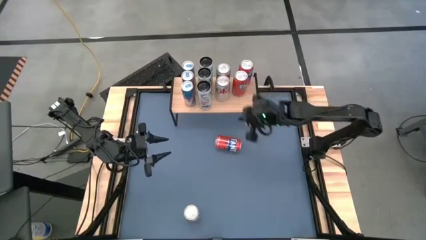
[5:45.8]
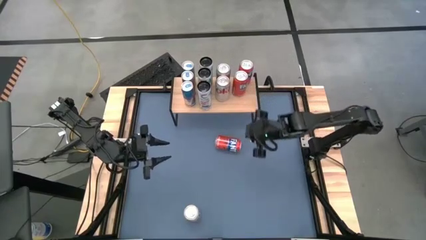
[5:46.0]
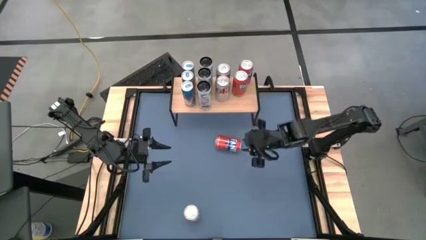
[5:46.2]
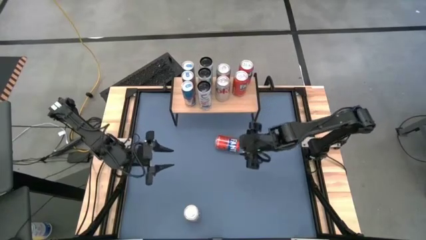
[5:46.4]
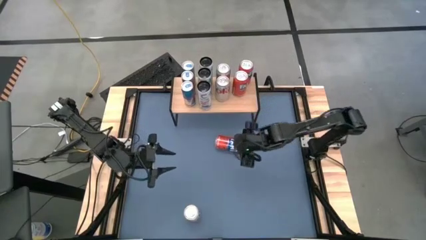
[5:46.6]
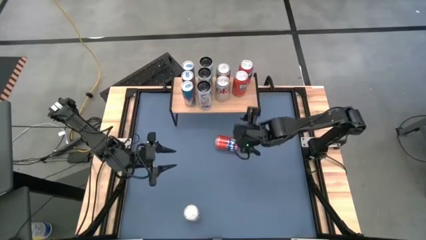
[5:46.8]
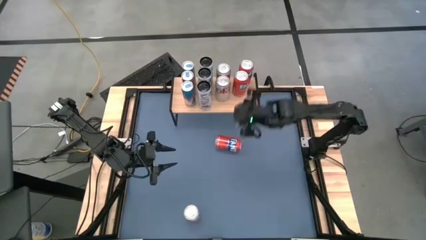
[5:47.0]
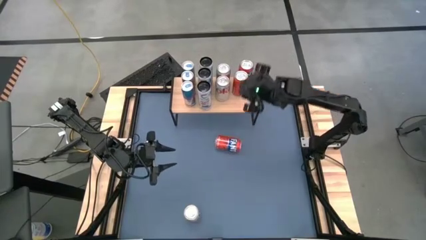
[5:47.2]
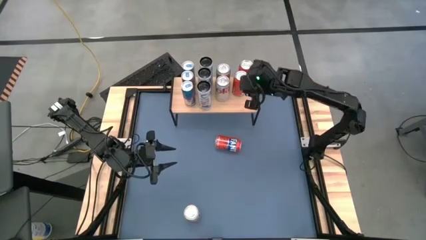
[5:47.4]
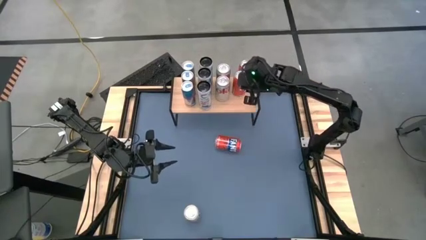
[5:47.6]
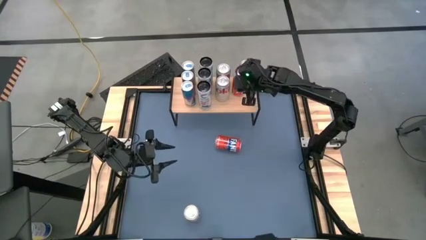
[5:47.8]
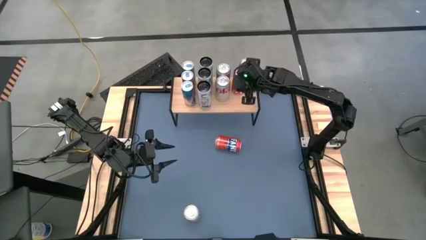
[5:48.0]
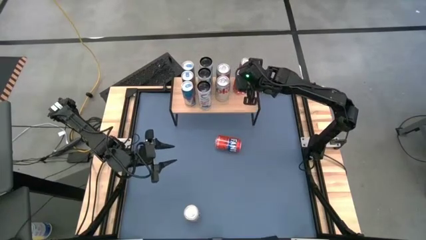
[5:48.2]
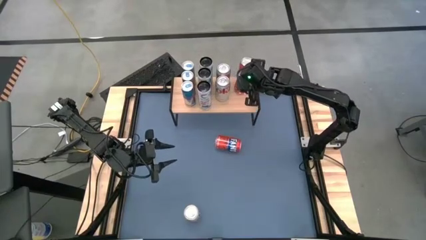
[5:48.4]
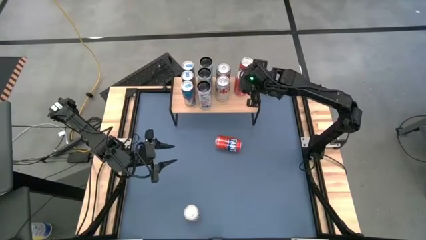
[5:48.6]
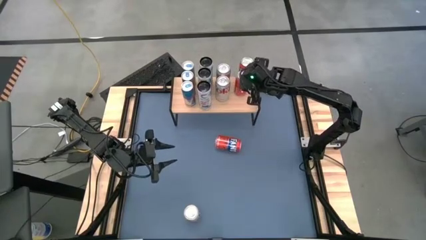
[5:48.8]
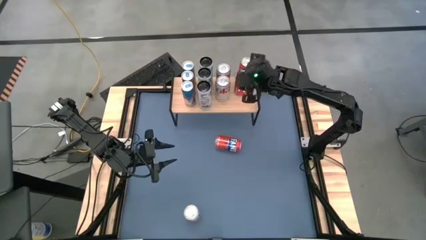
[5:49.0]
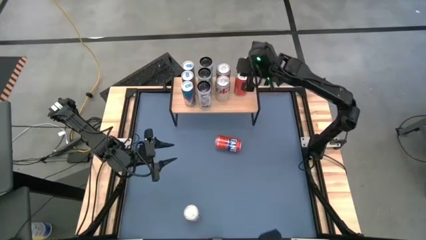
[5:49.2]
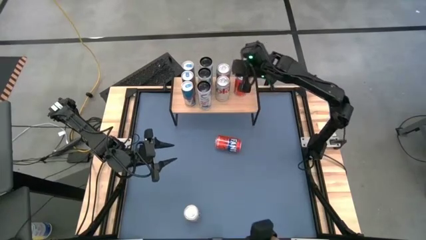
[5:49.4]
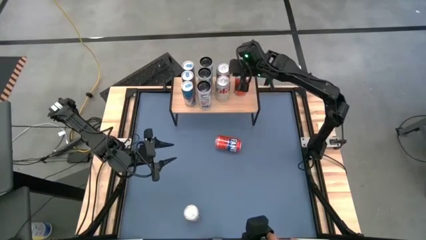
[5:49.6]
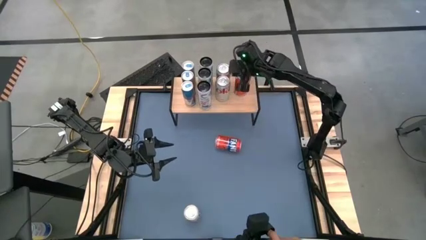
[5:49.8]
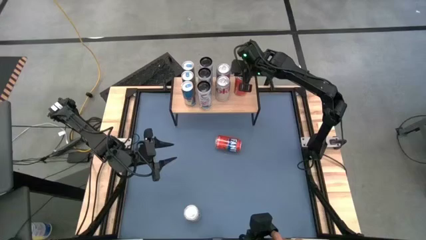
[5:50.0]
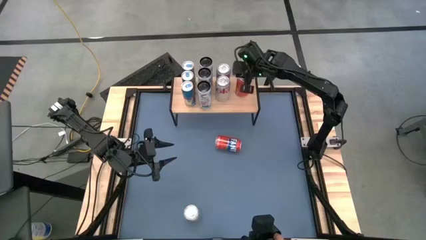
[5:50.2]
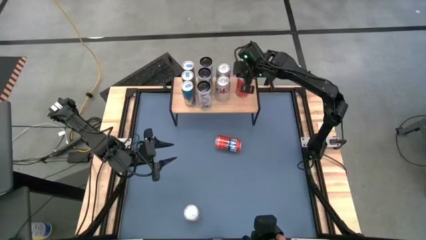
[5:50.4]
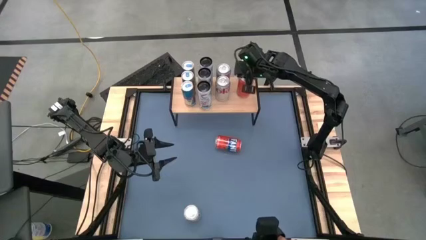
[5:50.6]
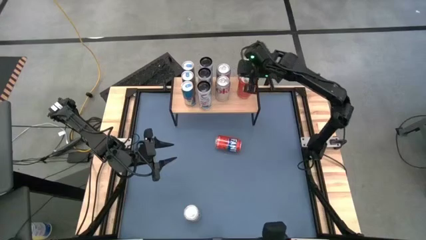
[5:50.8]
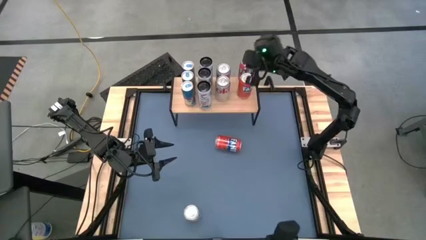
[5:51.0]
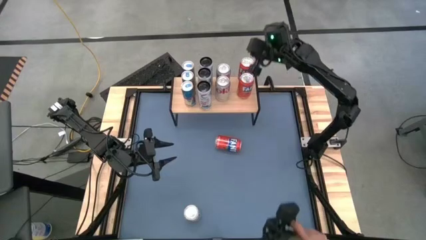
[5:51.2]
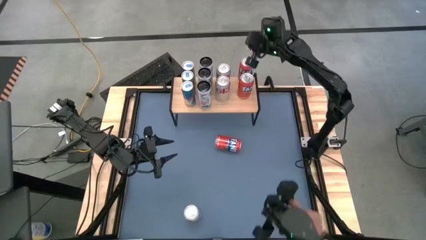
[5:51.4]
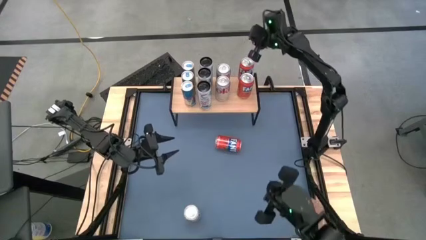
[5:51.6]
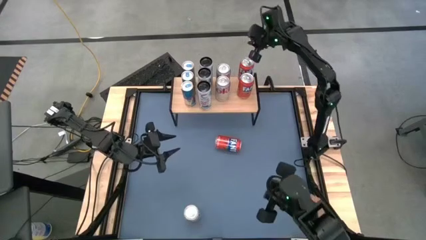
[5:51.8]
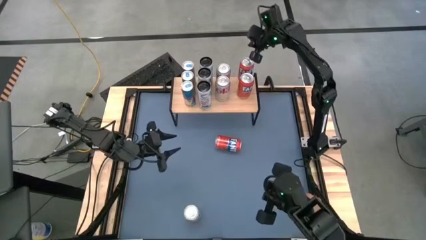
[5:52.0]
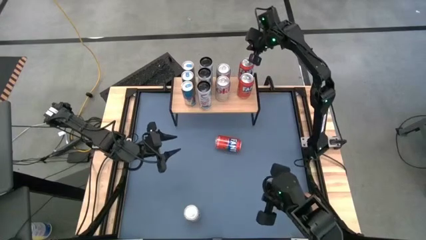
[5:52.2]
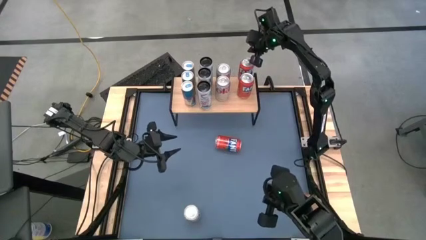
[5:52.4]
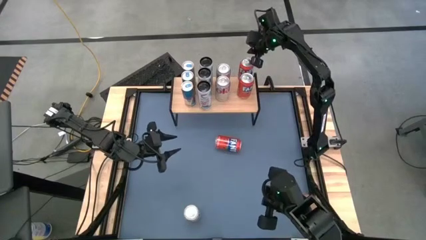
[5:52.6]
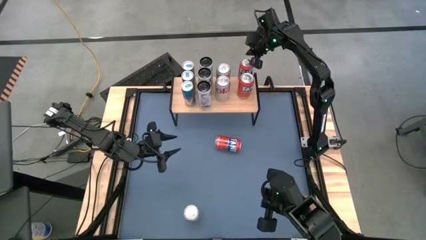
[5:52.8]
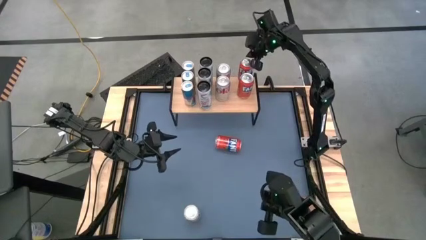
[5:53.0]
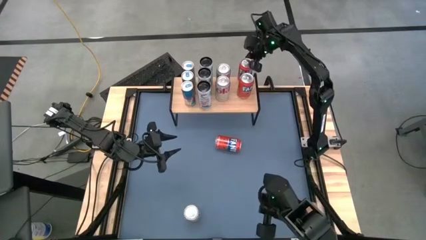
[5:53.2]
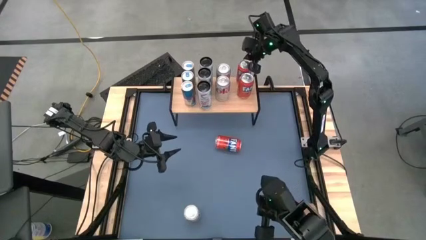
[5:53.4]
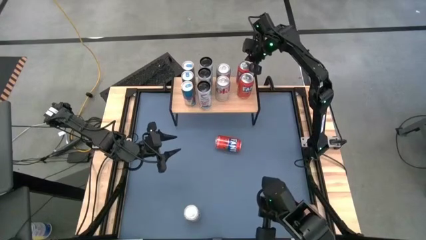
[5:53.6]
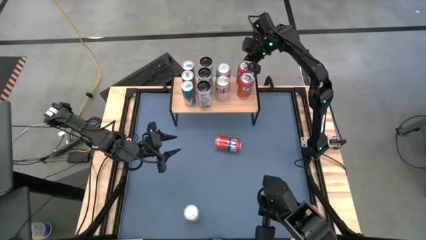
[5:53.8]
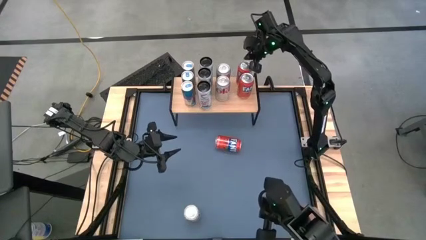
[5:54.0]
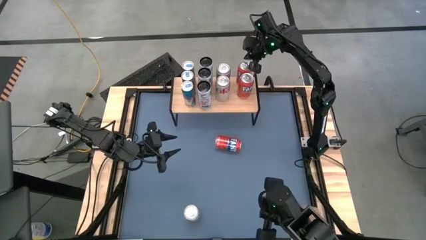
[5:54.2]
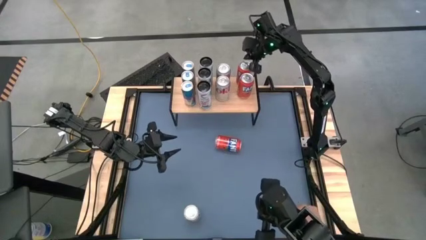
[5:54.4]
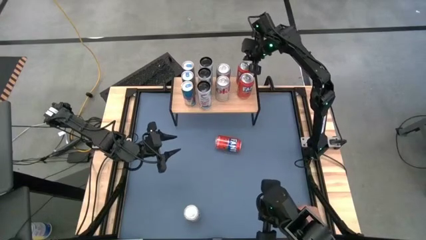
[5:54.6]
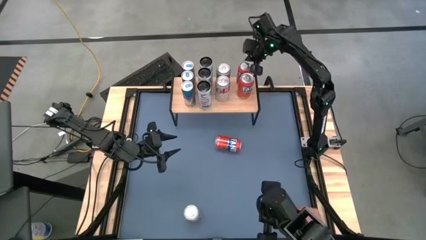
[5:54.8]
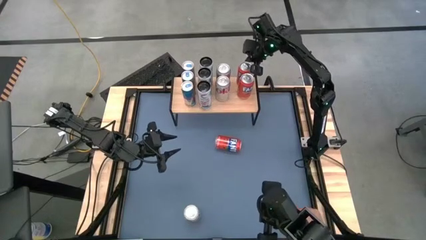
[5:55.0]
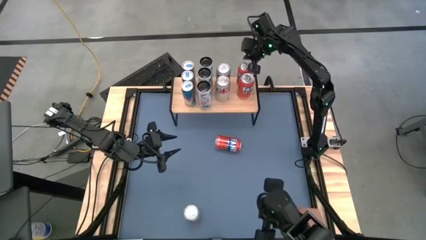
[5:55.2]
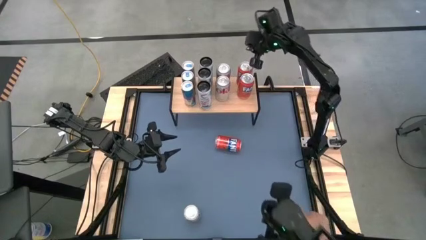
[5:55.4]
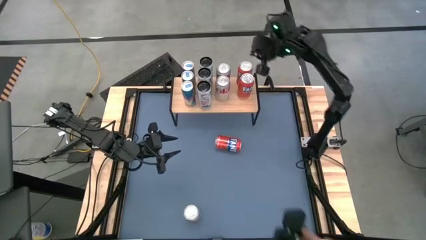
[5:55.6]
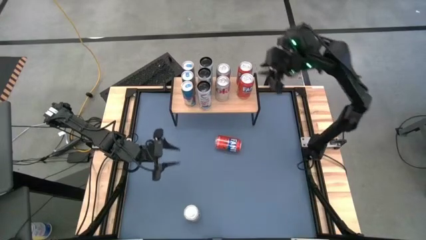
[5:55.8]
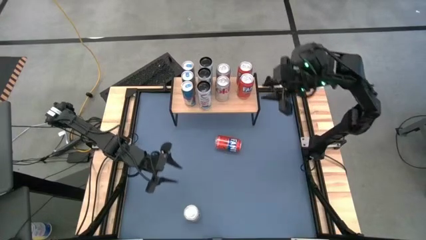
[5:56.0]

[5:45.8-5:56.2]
Task: Place canned beverage on shelf
Adjust the orange soda can
